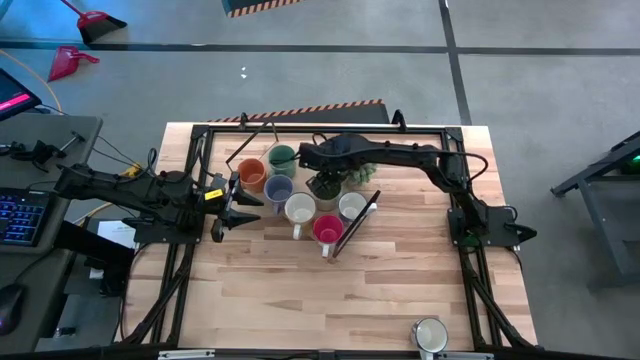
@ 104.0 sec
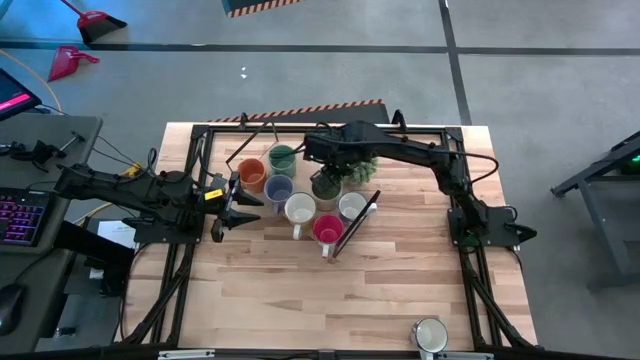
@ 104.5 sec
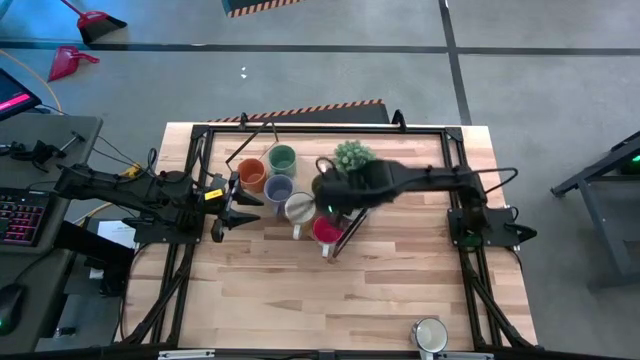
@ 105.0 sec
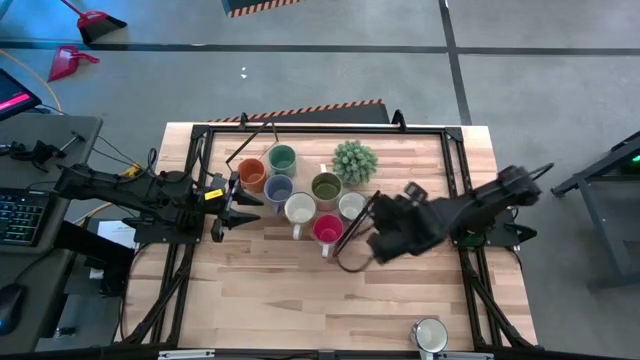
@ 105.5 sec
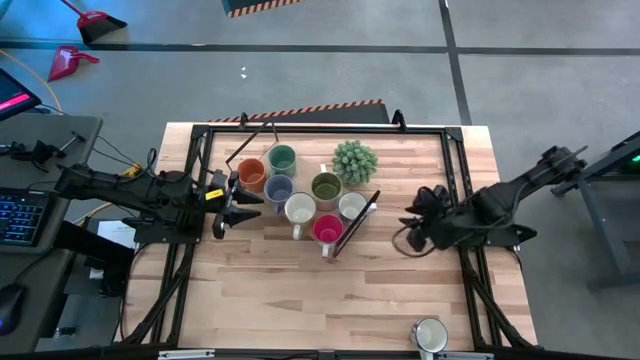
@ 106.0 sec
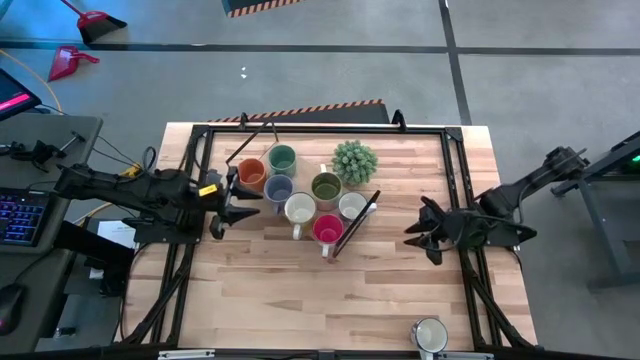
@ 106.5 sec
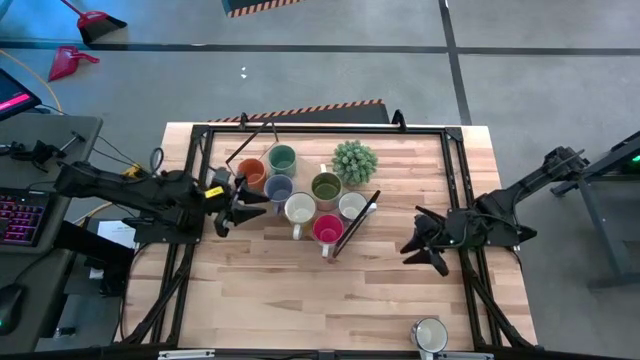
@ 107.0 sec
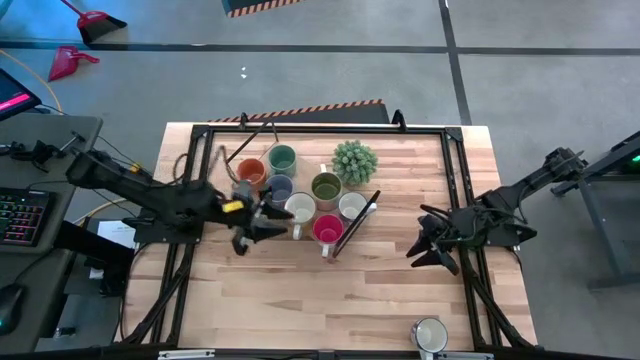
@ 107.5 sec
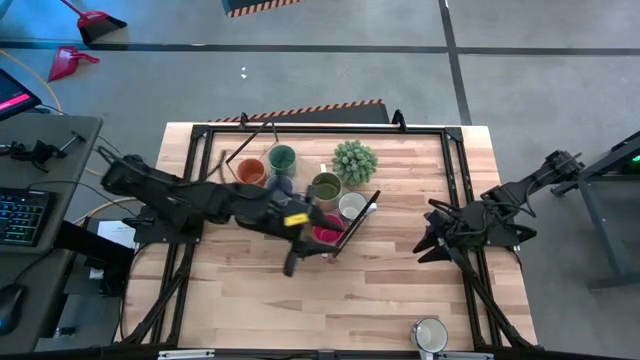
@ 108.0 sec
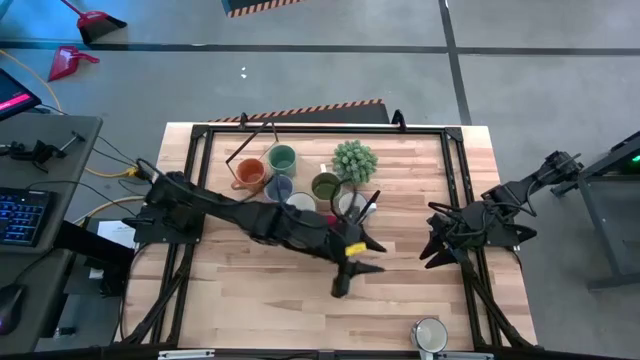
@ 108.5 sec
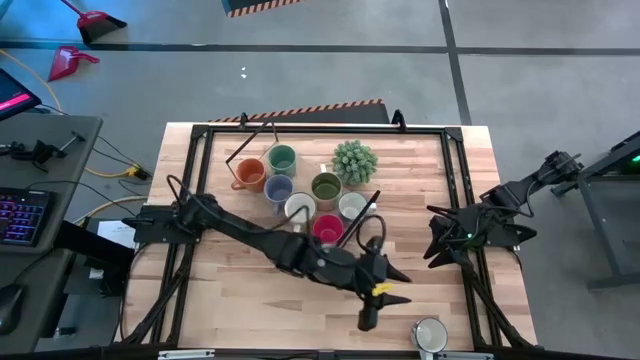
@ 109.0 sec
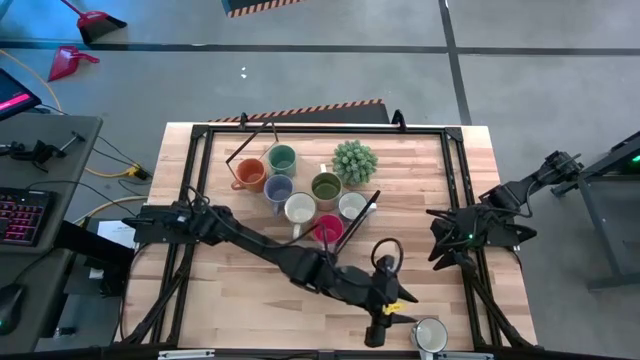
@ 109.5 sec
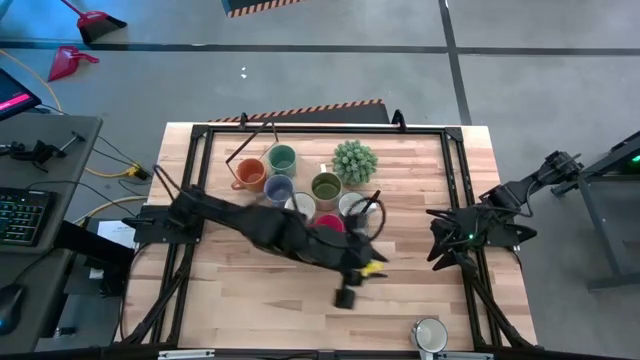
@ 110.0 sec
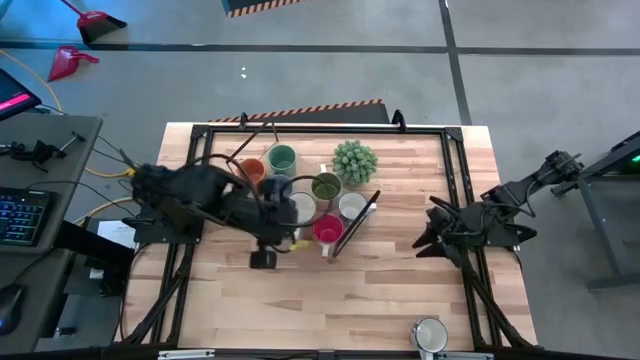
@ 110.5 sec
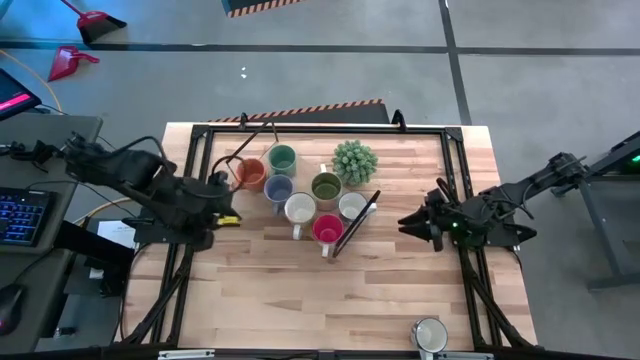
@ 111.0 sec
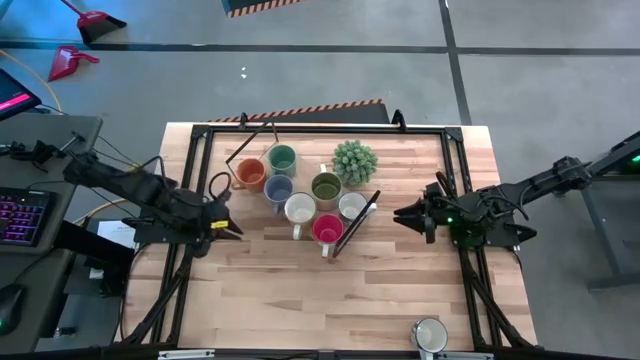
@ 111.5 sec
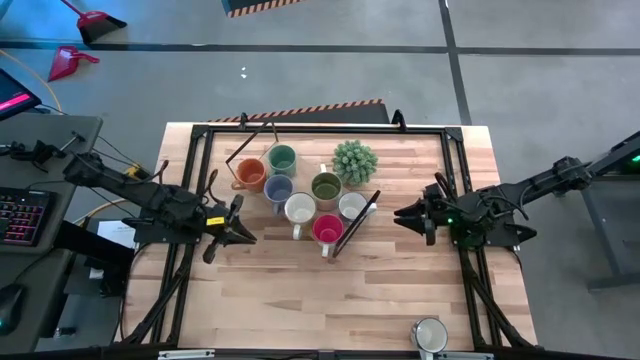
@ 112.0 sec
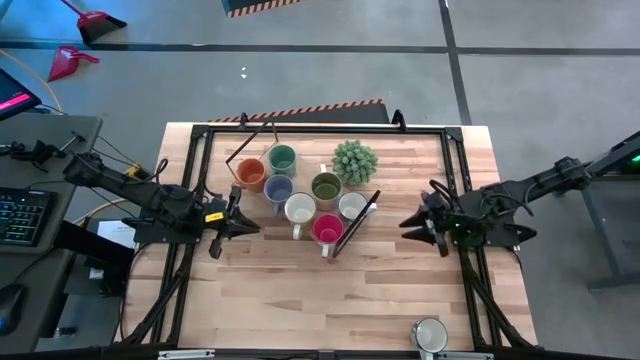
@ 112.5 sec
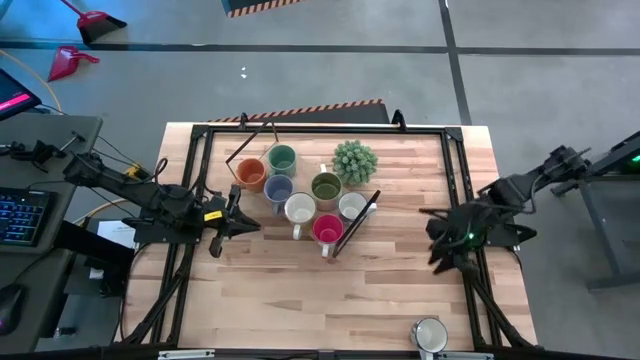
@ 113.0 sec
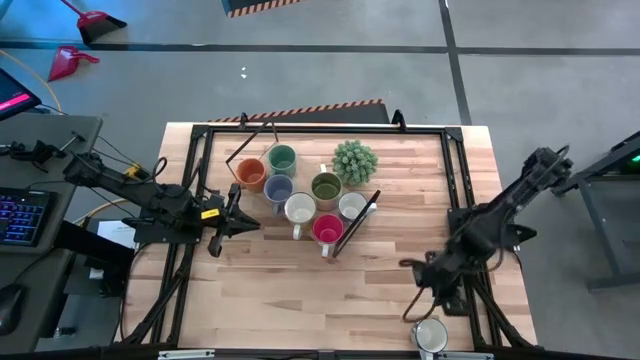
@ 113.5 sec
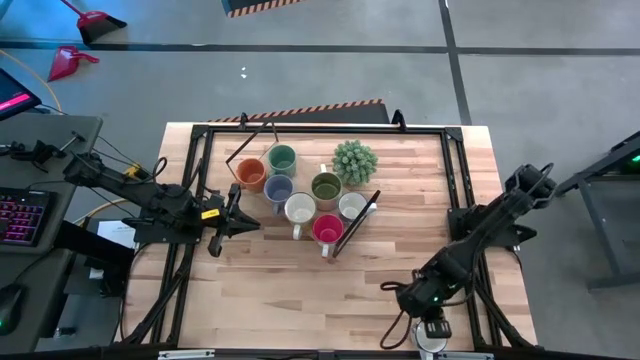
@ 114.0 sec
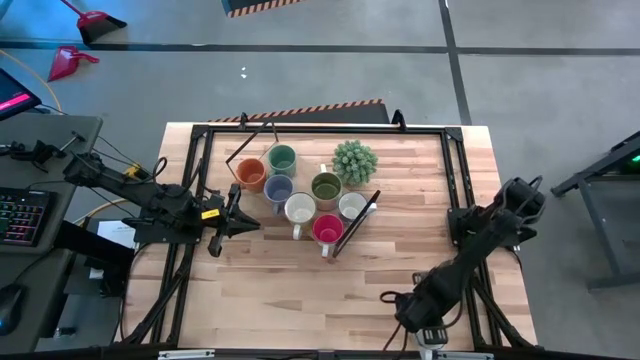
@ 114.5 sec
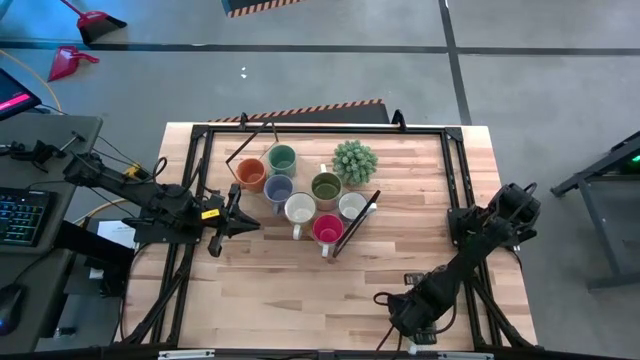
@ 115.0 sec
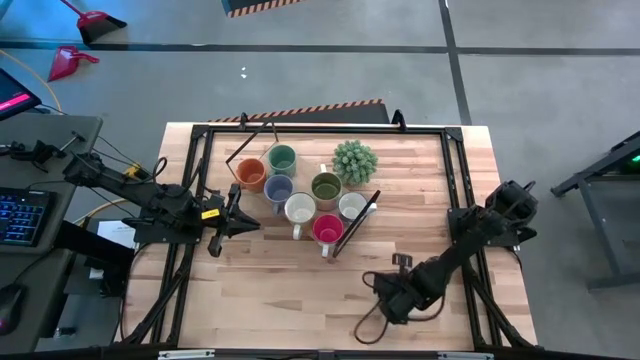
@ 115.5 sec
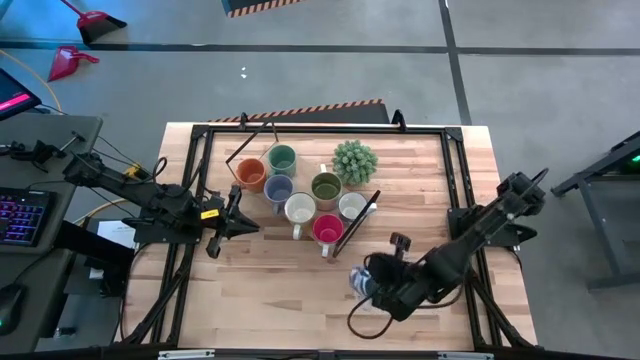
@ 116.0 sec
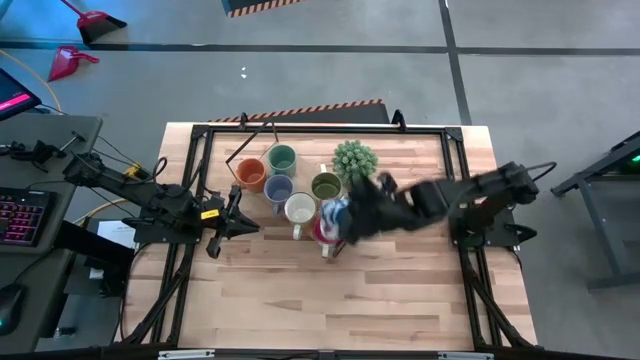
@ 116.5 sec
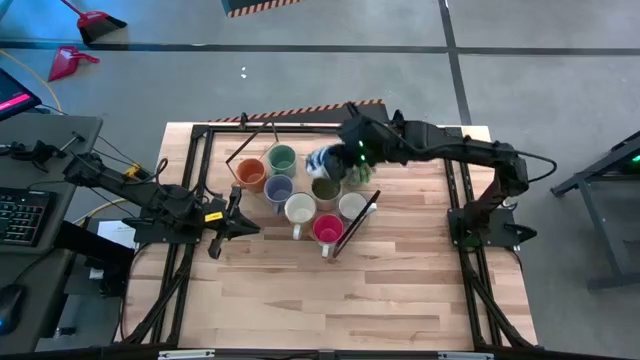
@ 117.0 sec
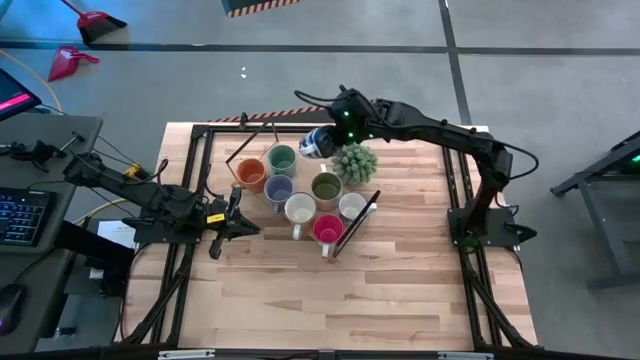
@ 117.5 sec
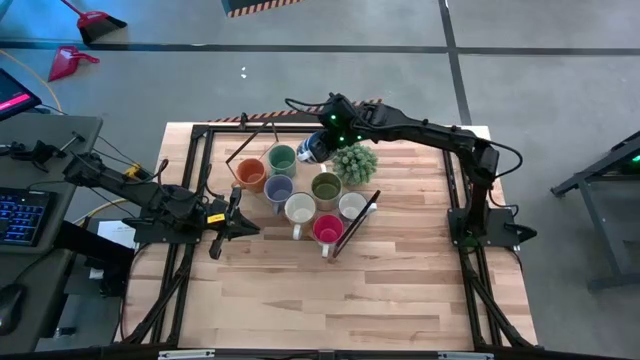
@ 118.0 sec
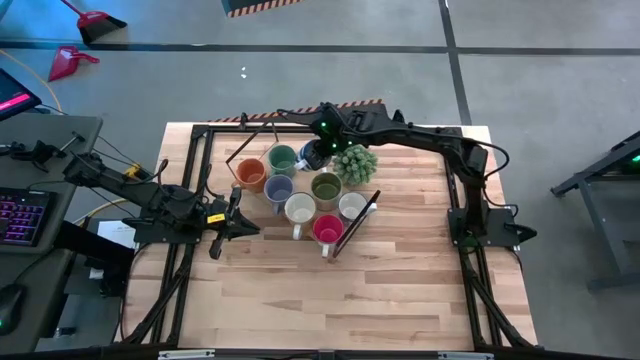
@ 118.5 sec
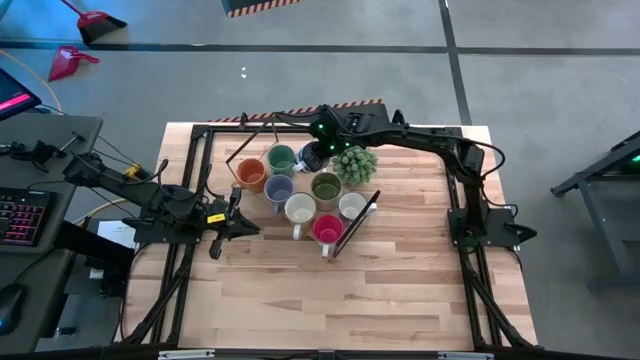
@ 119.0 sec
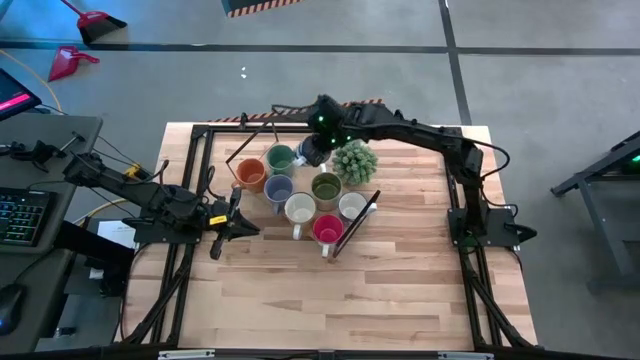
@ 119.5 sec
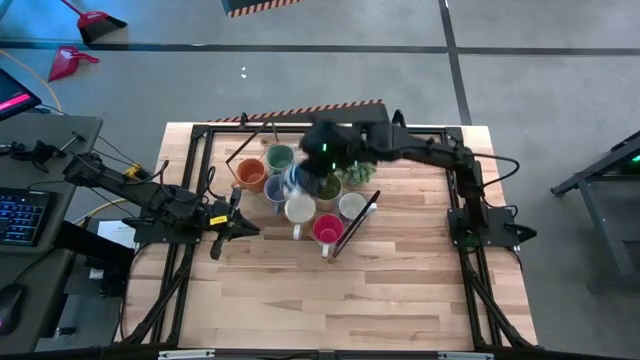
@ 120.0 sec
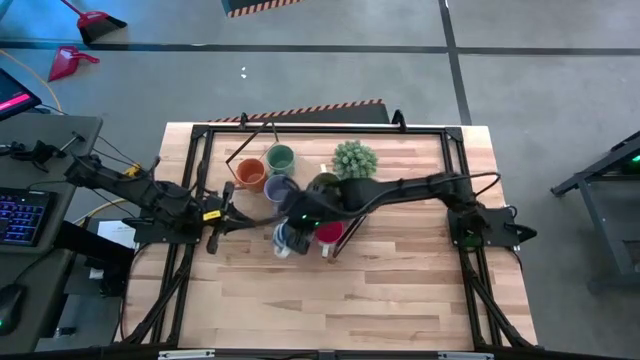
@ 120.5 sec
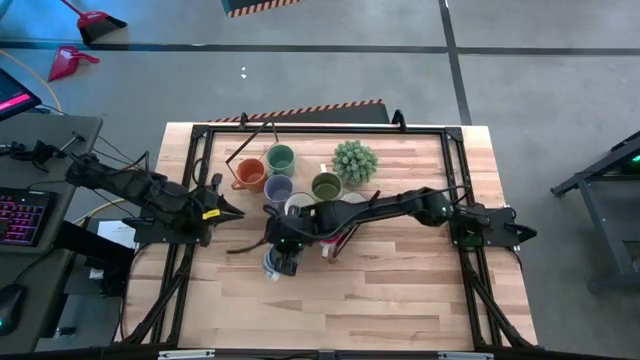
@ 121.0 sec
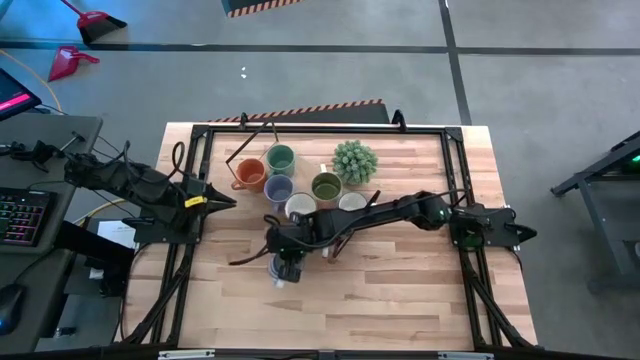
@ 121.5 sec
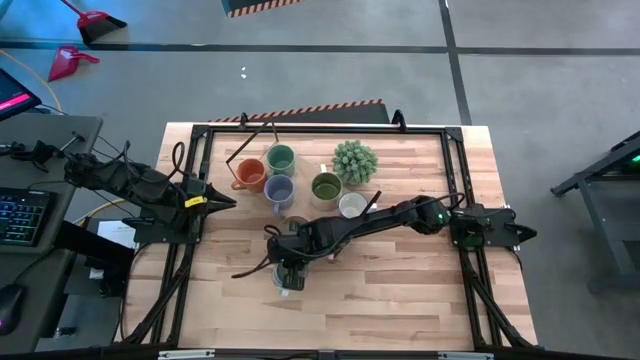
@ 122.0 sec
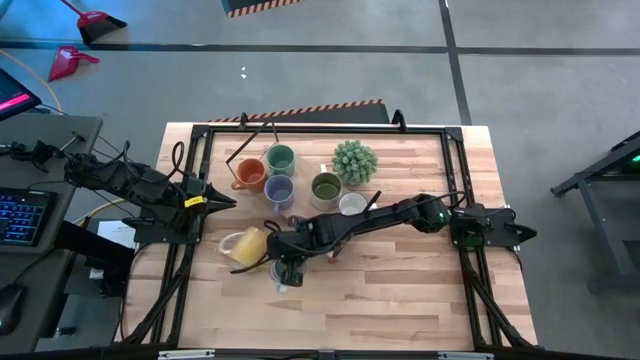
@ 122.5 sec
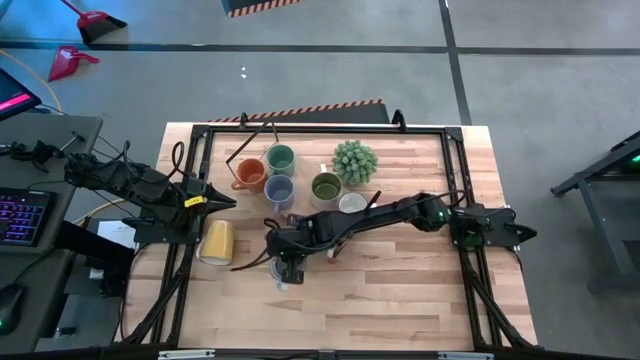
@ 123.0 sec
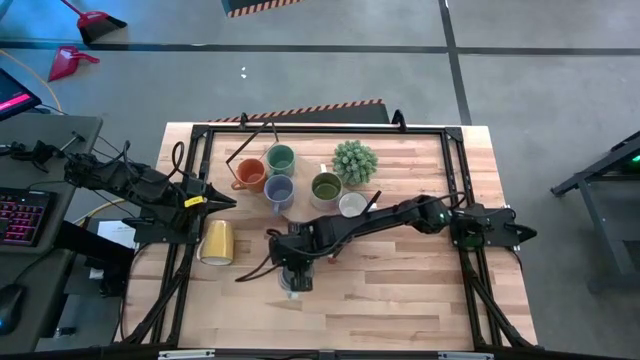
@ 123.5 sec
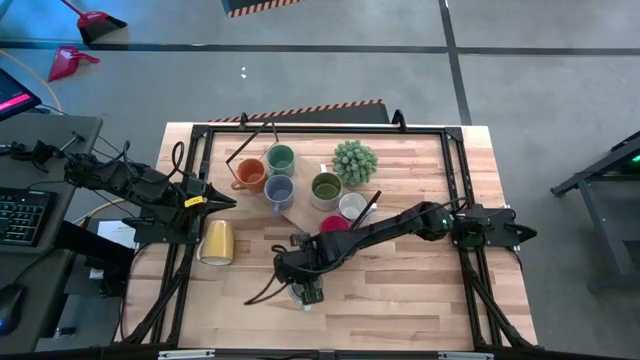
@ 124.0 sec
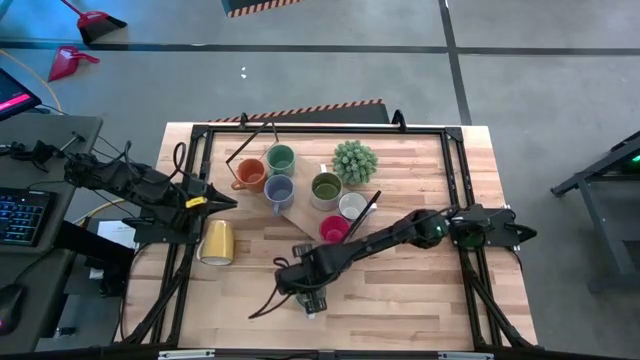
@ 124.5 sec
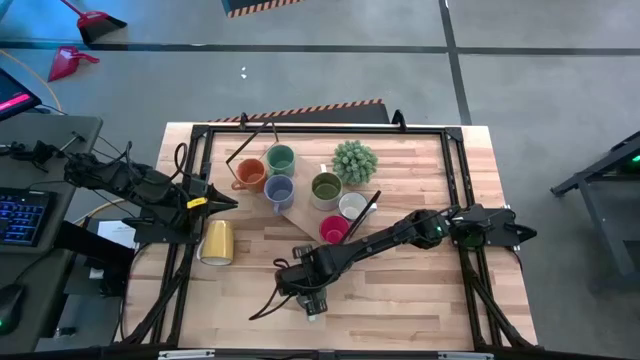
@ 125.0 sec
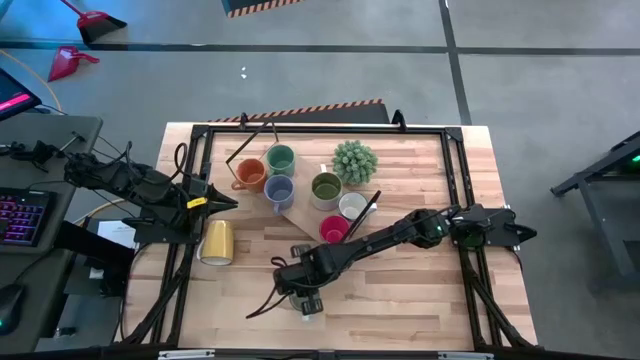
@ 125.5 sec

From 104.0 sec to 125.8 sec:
Task: Place coffee mugs
Move the blue patterned mug to the center of the table
